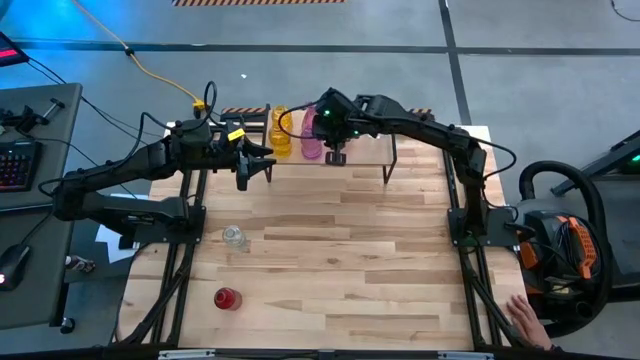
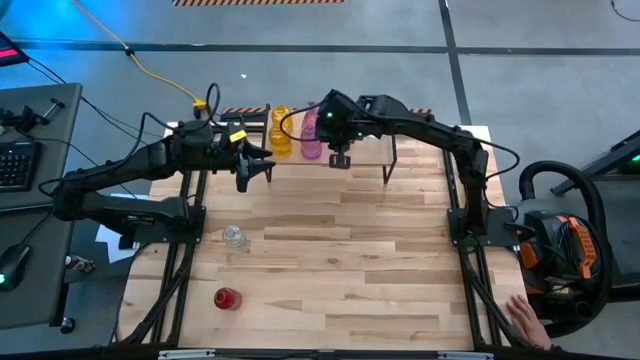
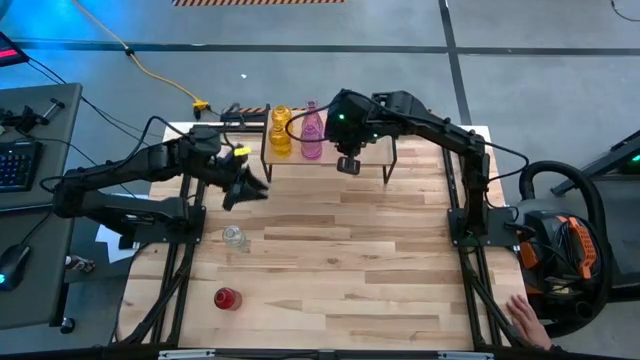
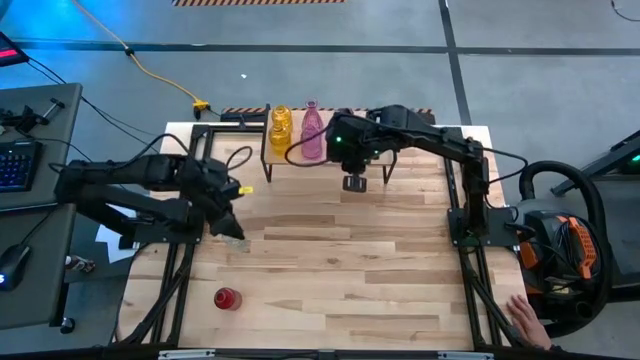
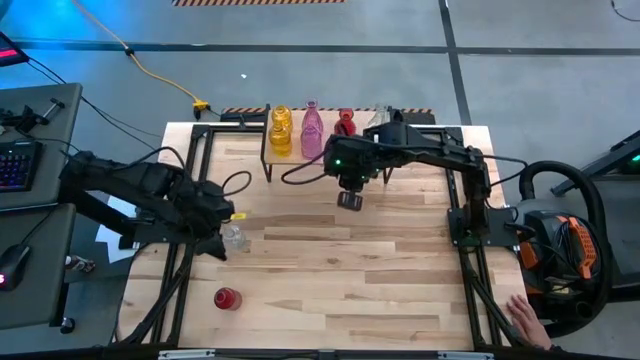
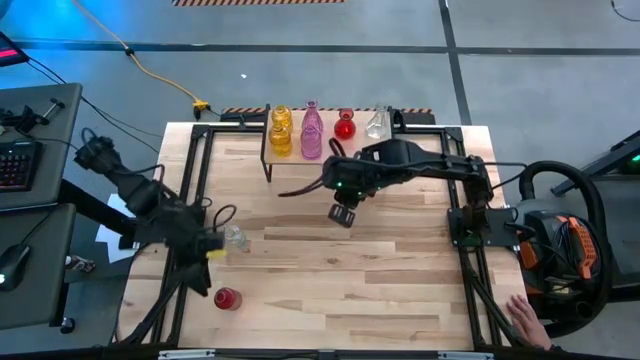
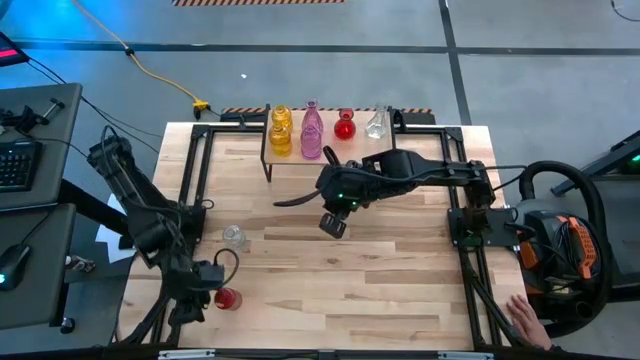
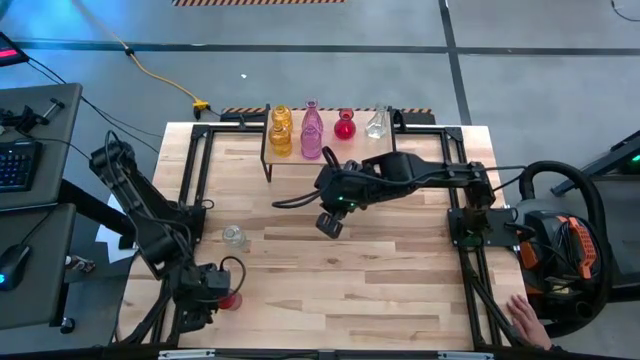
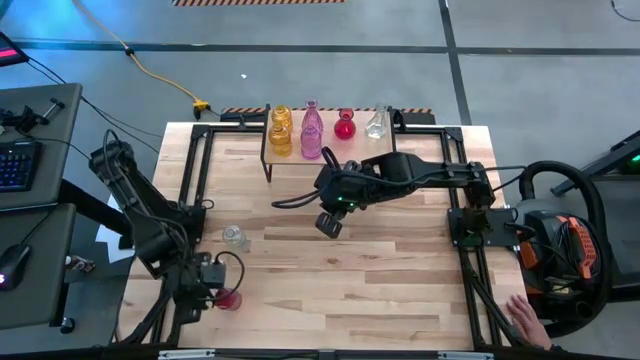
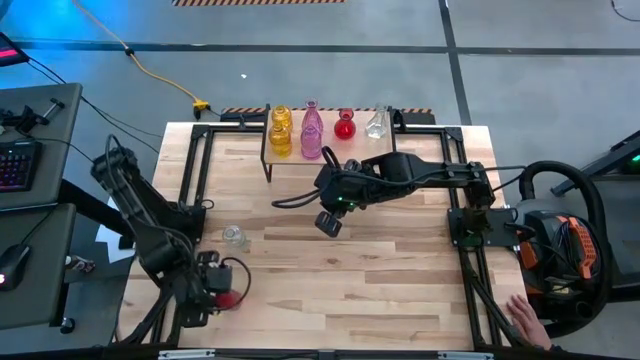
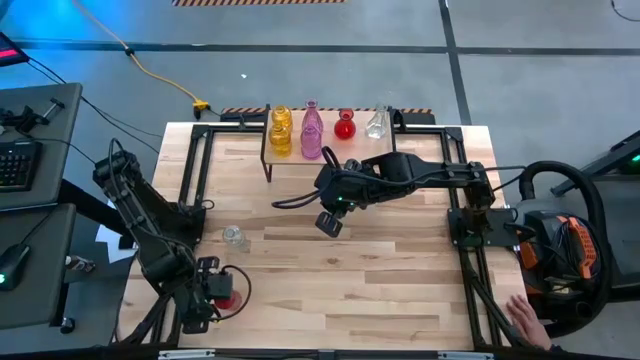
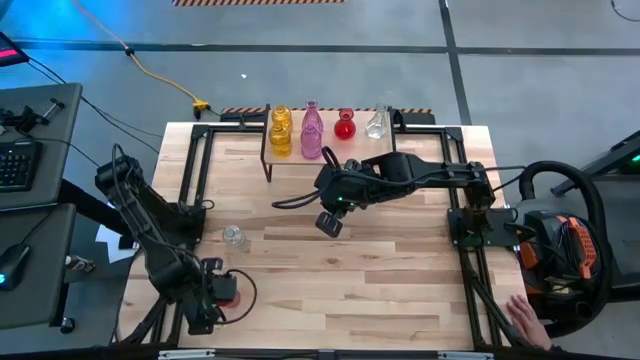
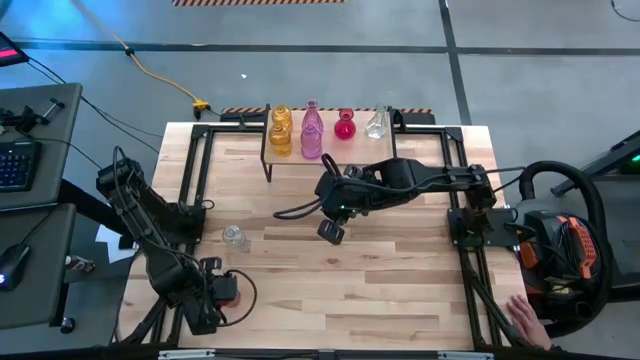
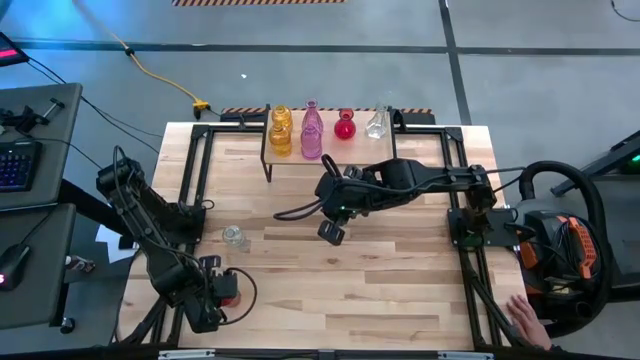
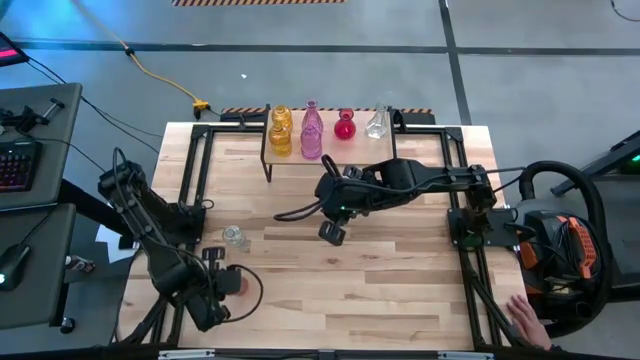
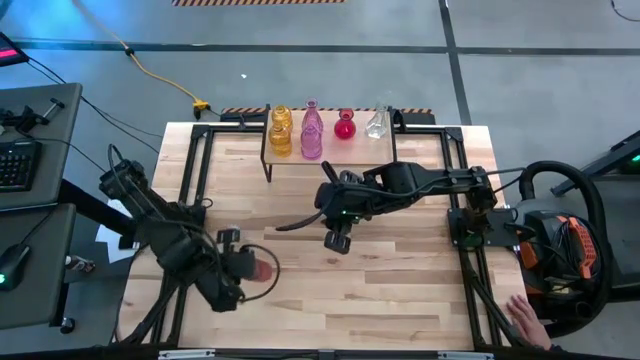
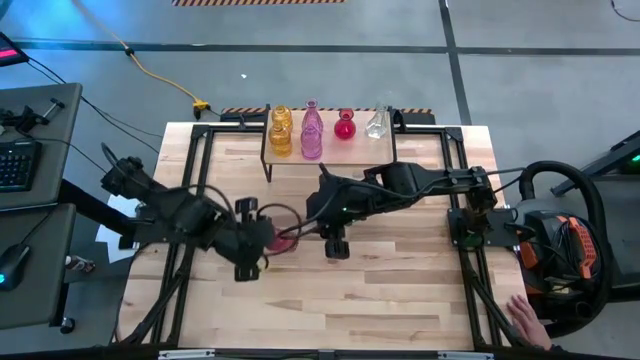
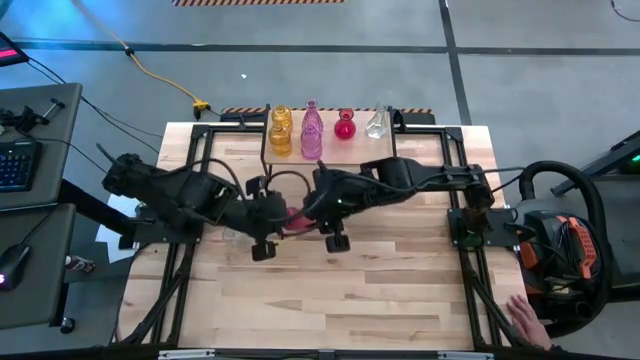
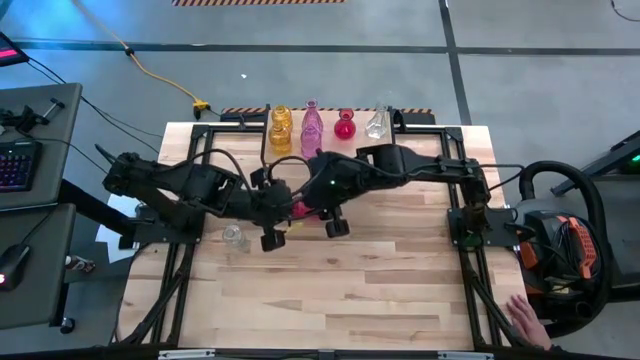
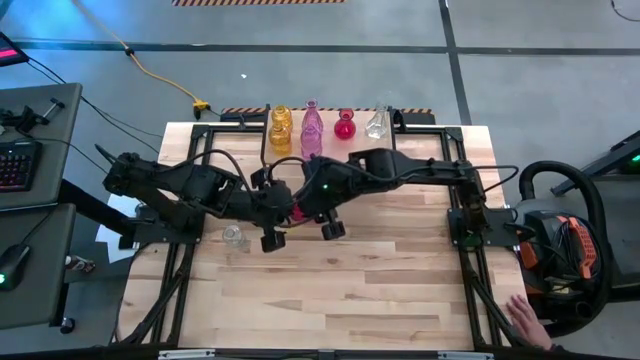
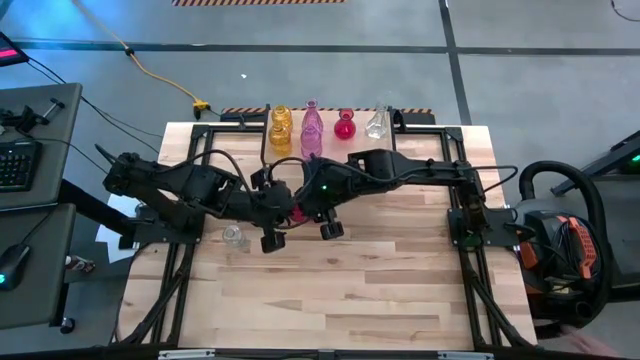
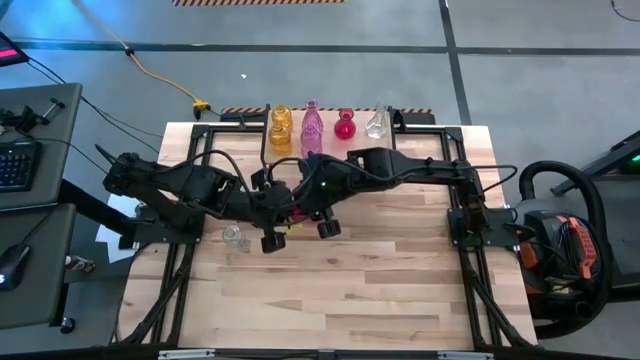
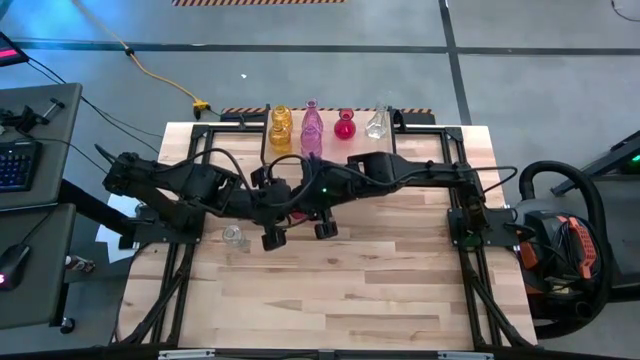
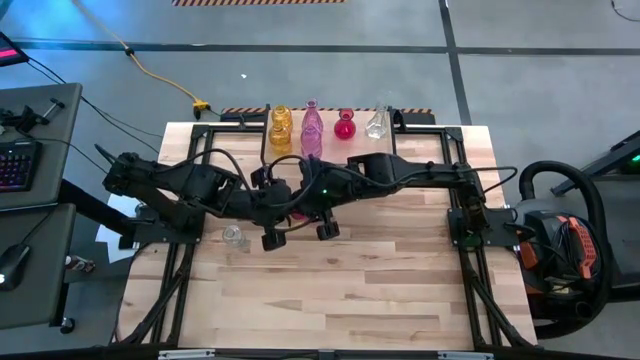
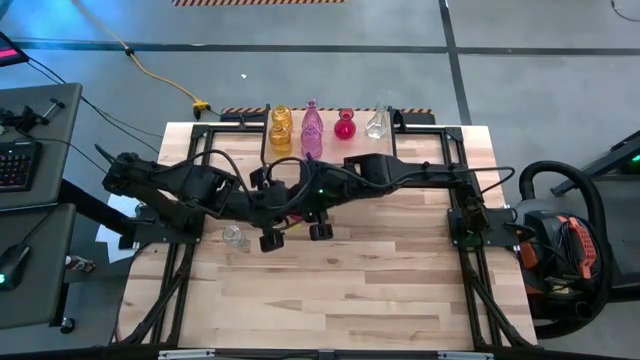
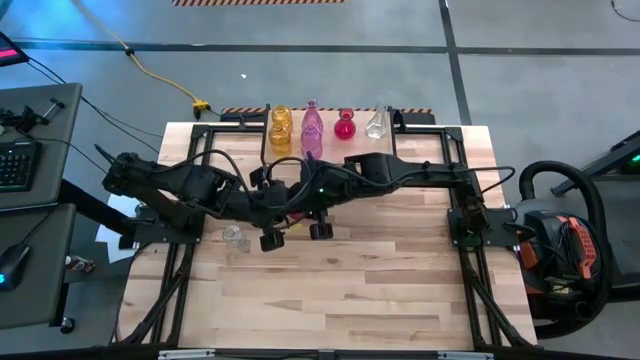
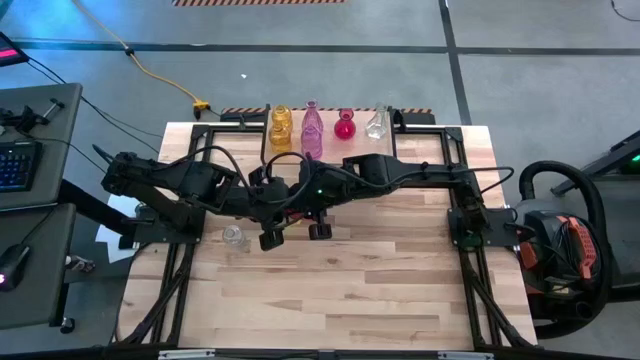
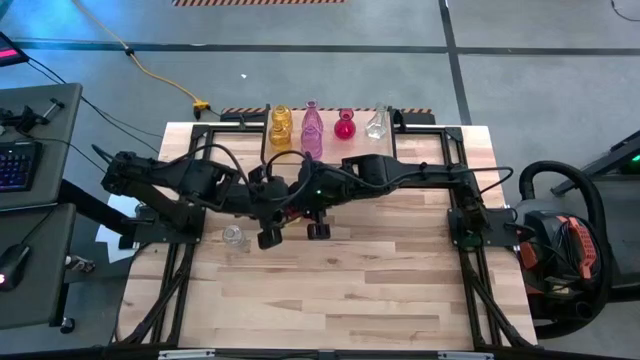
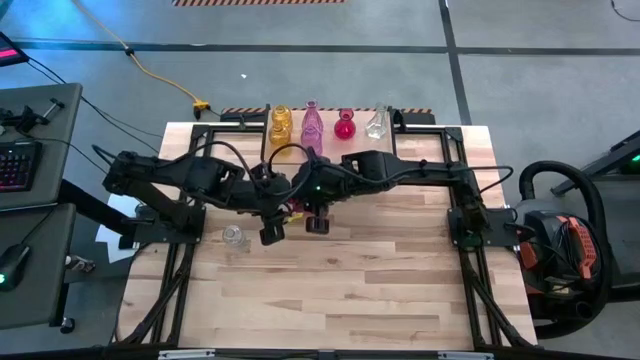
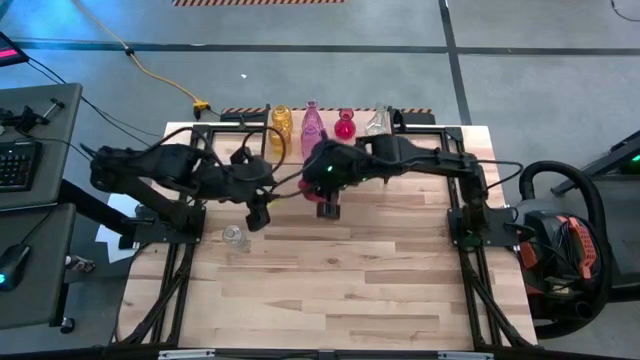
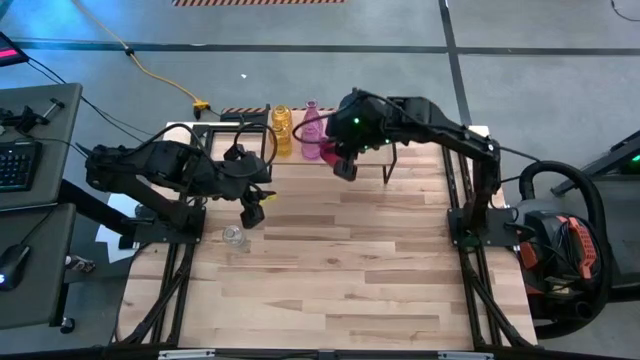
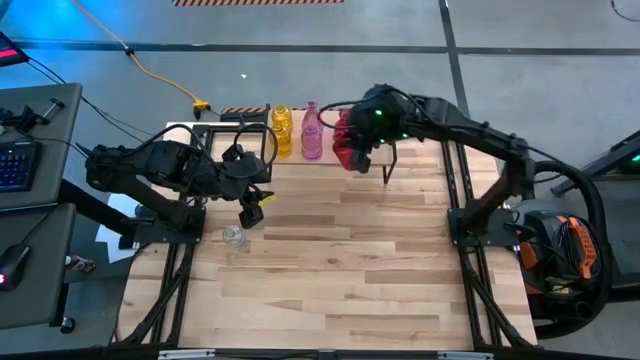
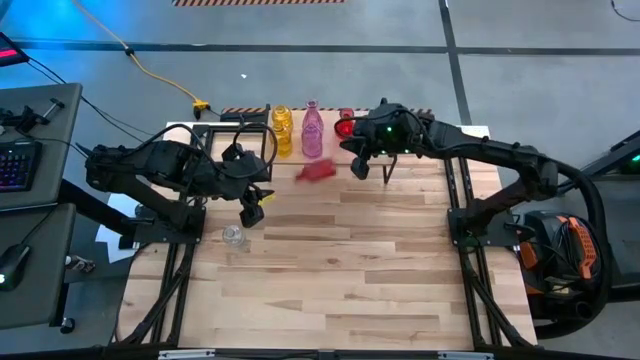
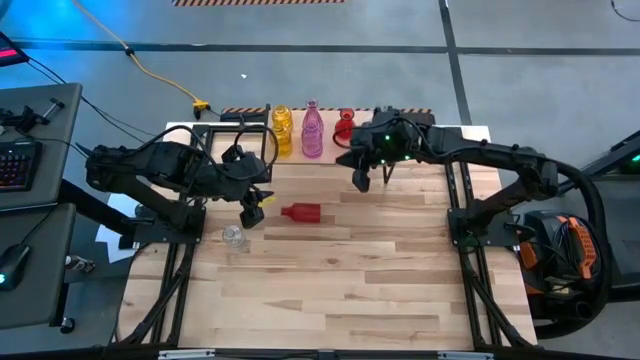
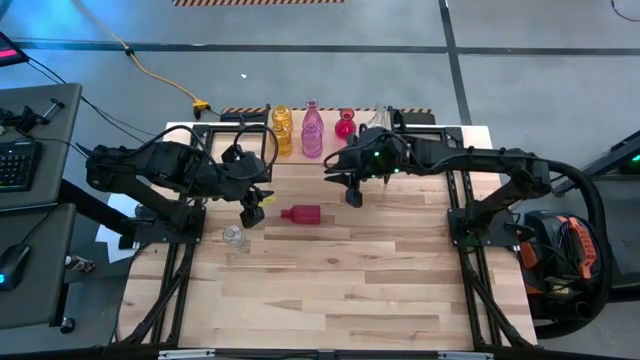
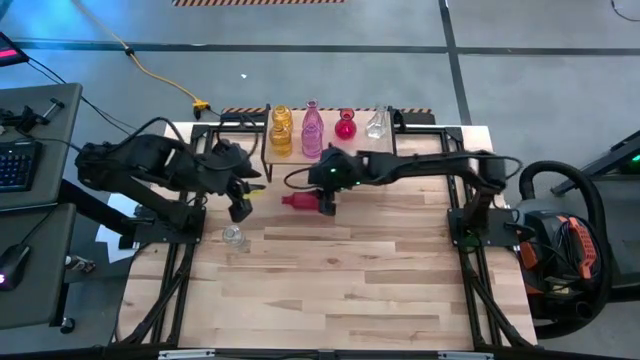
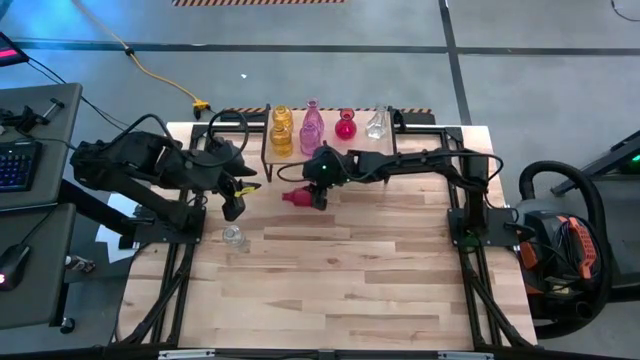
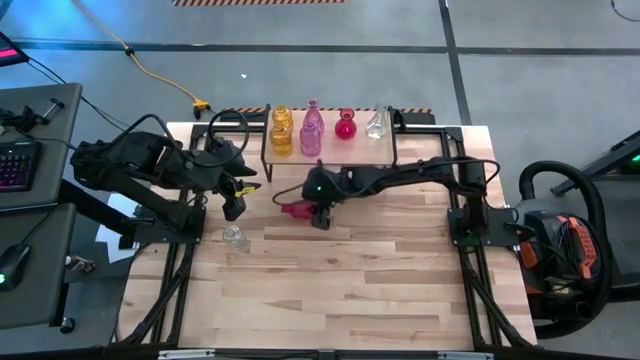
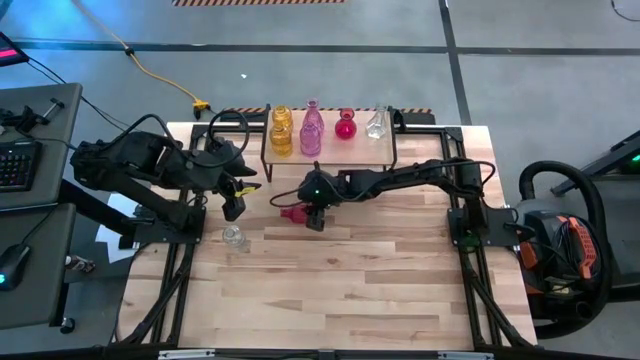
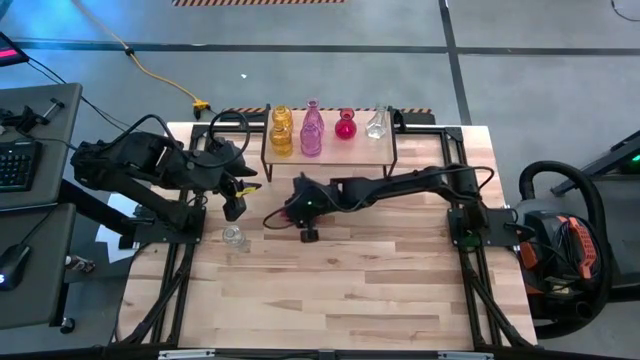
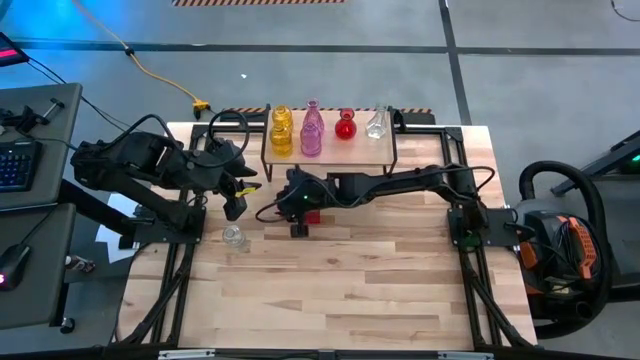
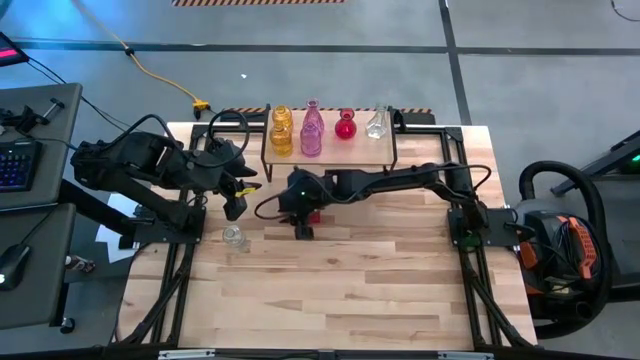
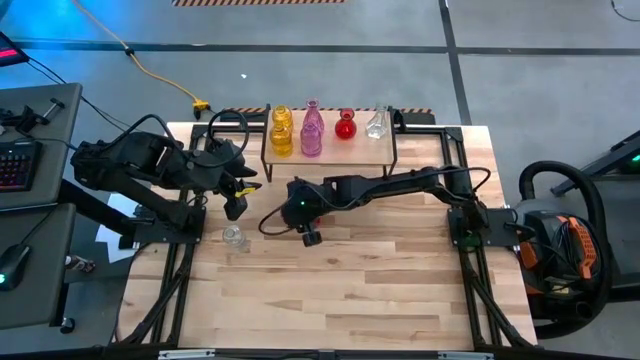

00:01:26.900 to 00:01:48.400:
Task: sort vases onto shelf
Put the red vase on the shelf
